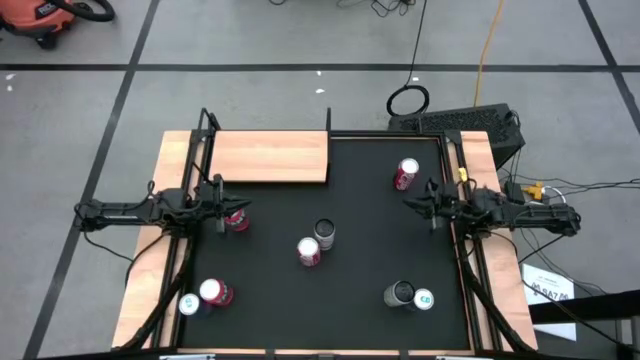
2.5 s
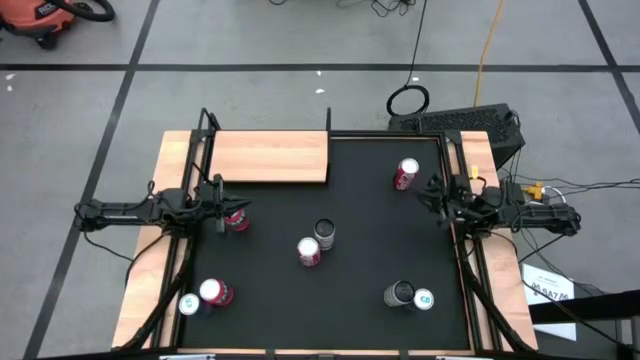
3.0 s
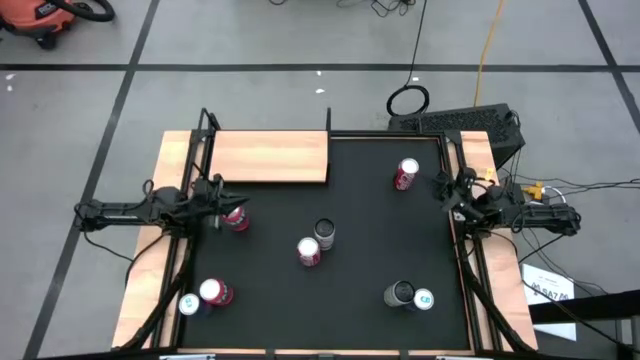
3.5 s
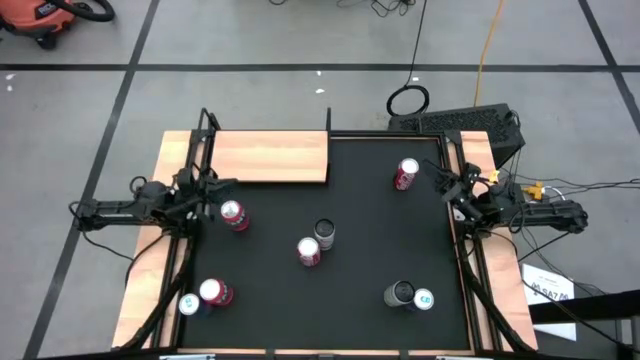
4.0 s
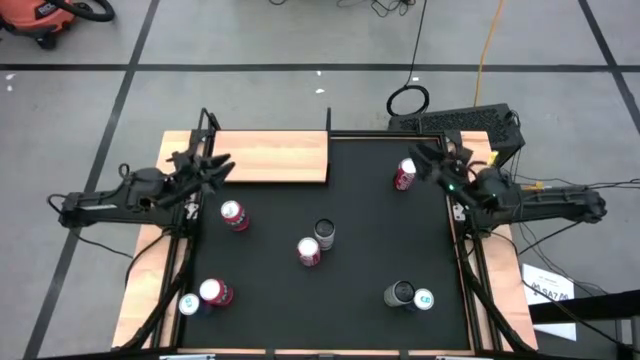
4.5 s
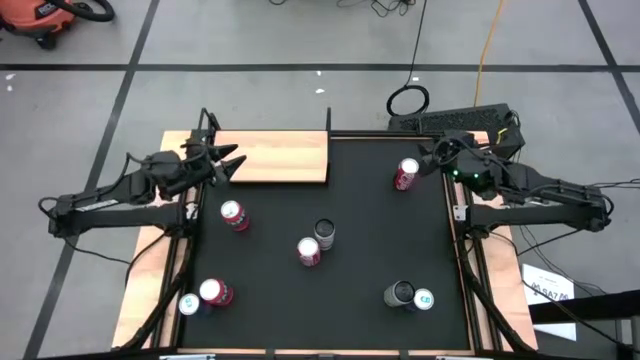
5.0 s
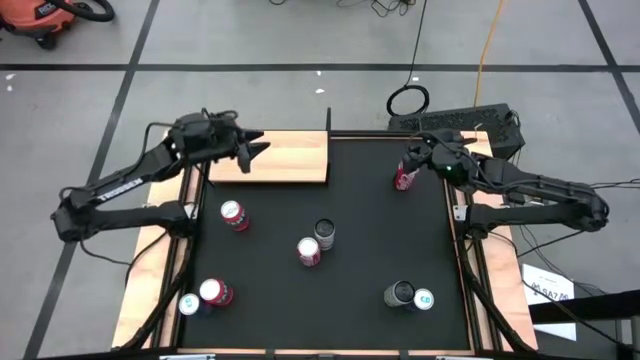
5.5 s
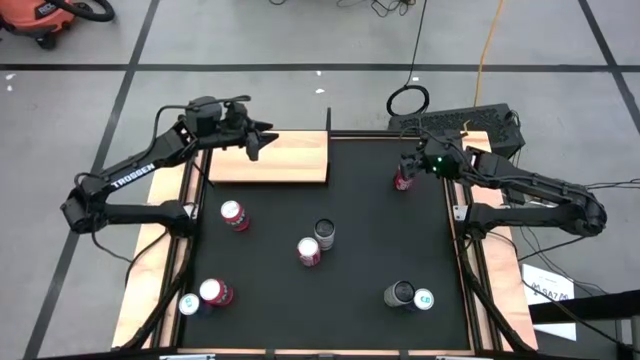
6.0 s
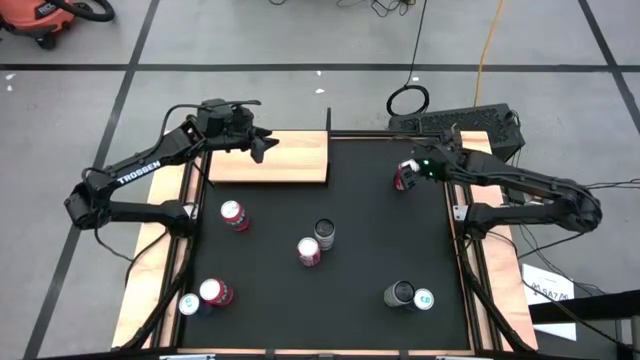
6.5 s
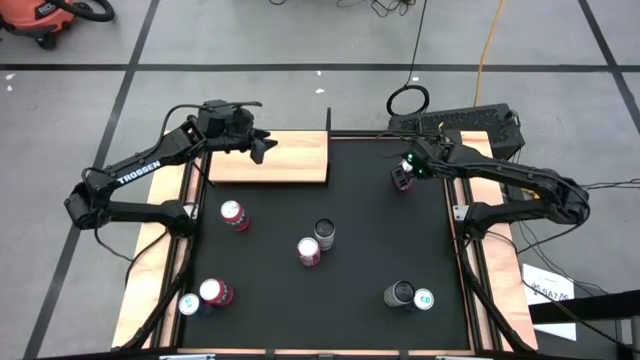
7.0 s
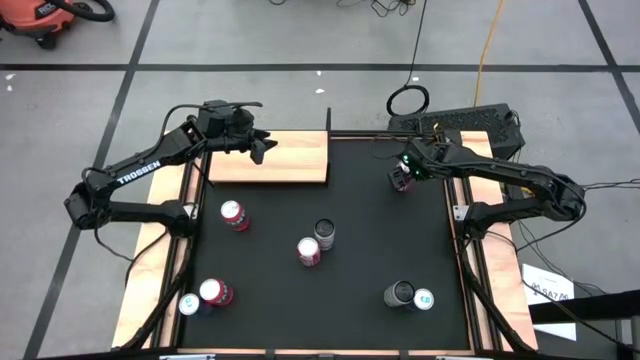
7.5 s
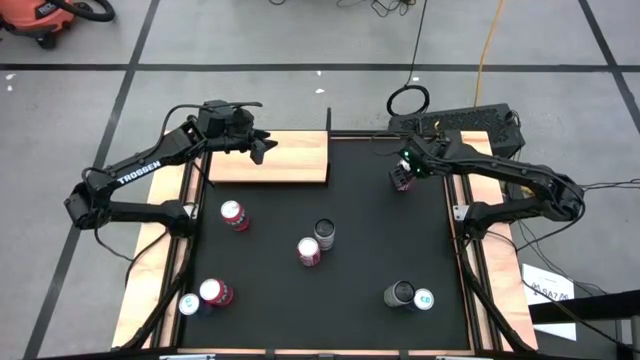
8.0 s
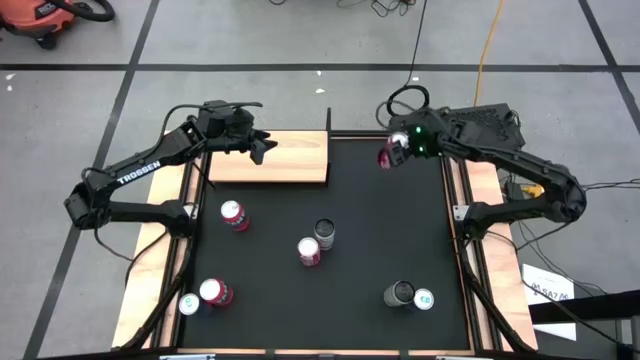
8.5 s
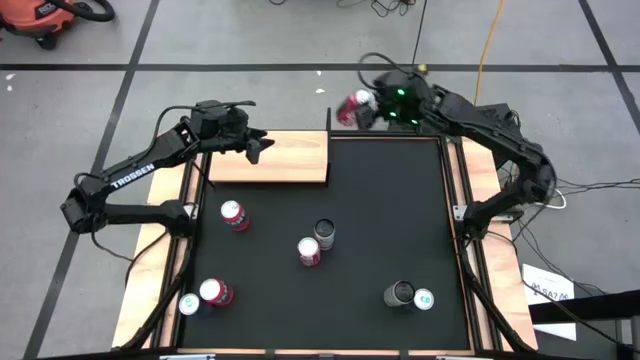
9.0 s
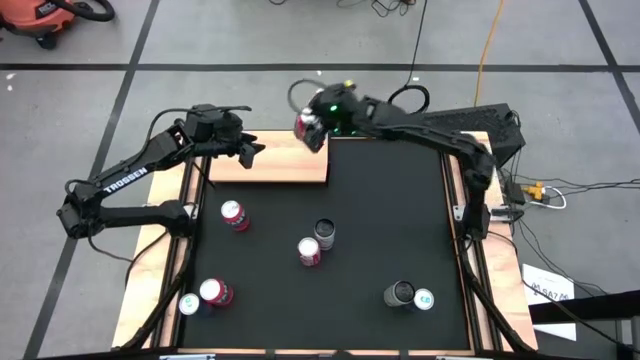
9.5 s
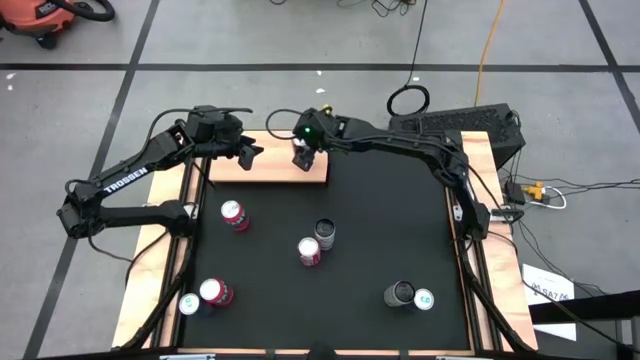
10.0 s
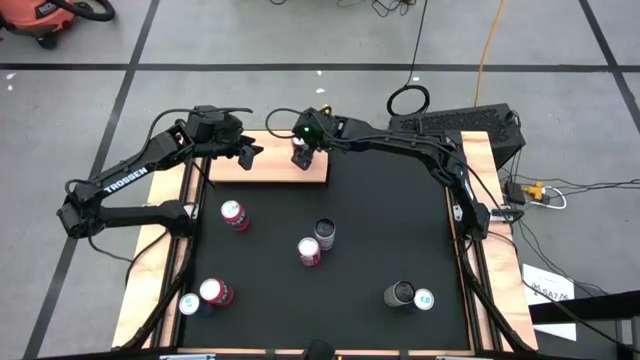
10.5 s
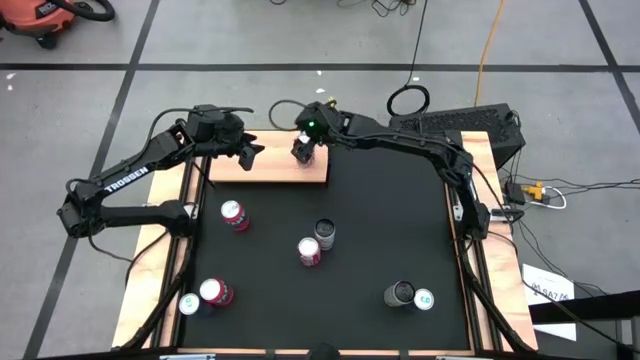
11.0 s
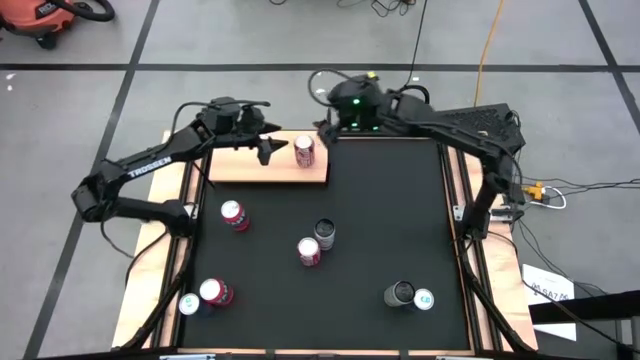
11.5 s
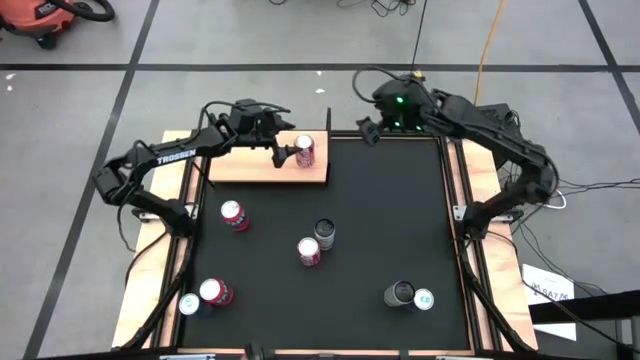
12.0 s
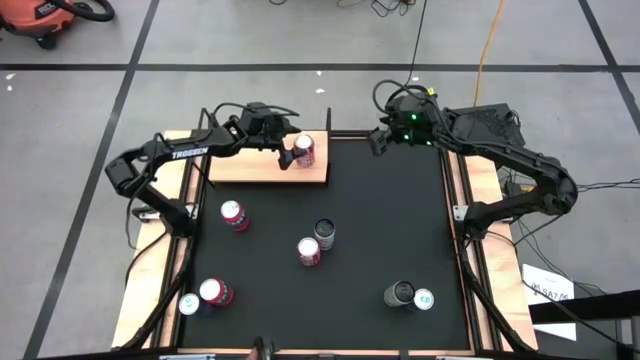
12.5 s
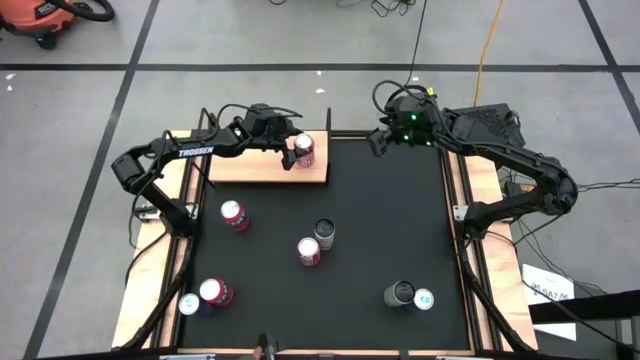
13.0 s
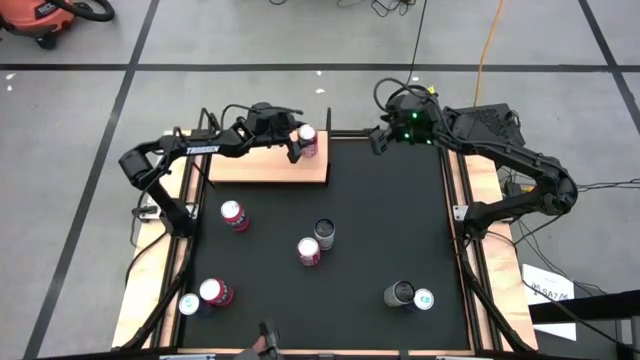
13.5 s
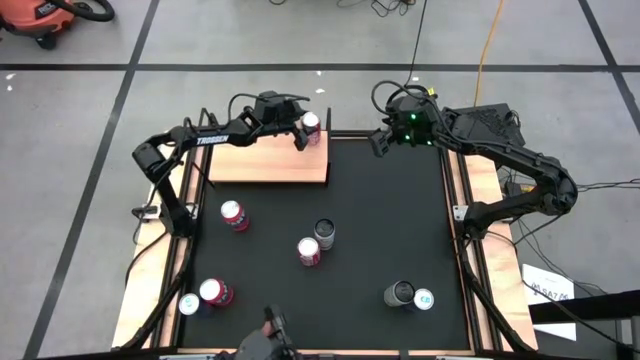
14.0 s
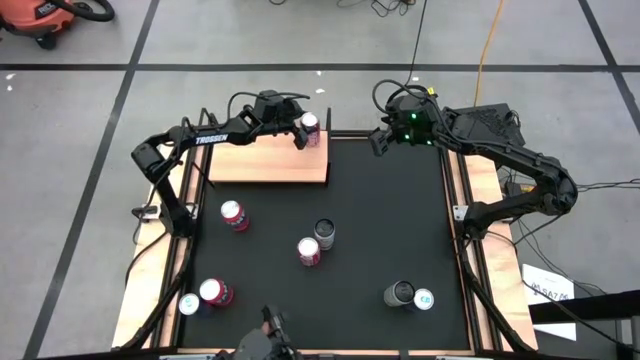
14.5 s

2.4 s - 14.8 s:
Task: Place canned beverage on shelf
Put the top red white soda can on the shelf

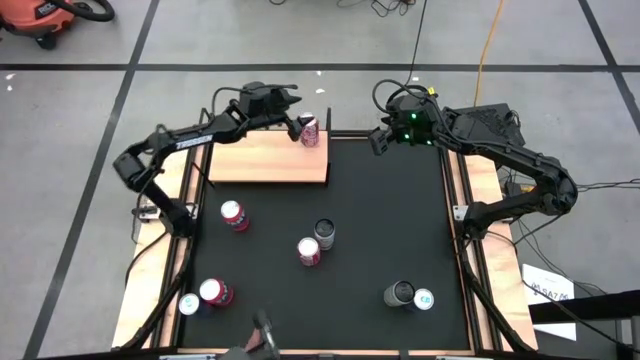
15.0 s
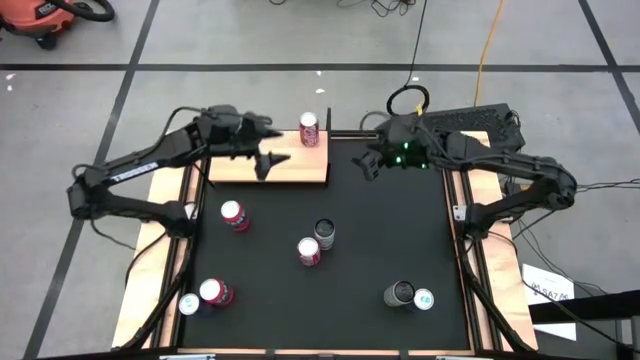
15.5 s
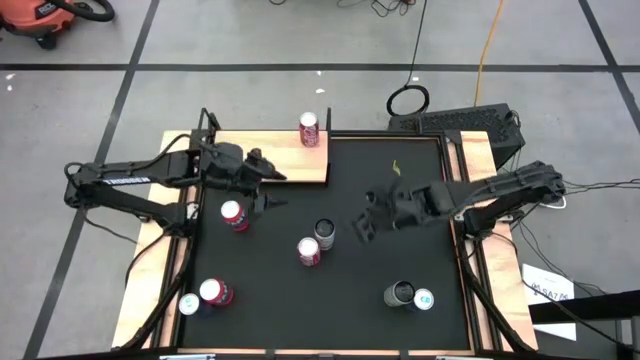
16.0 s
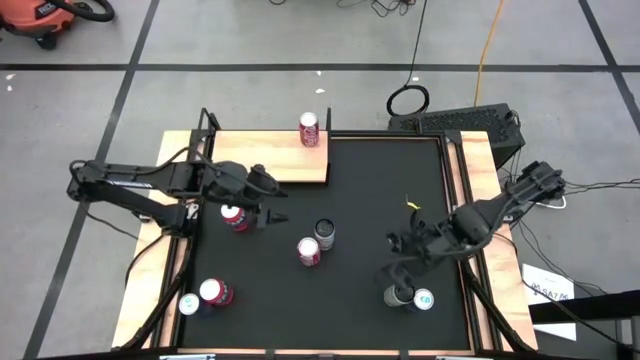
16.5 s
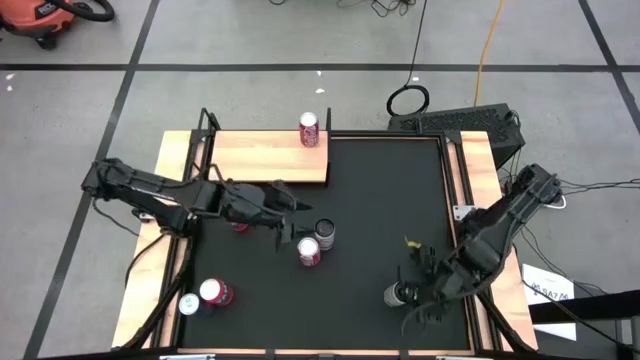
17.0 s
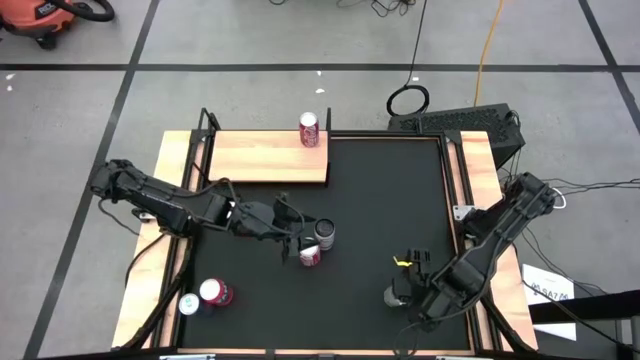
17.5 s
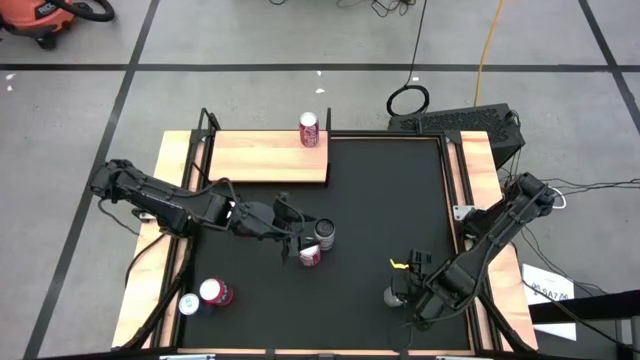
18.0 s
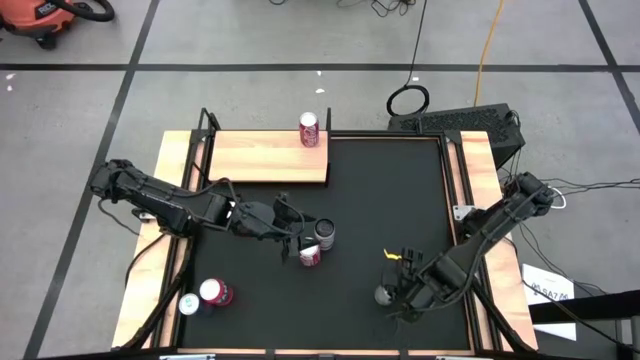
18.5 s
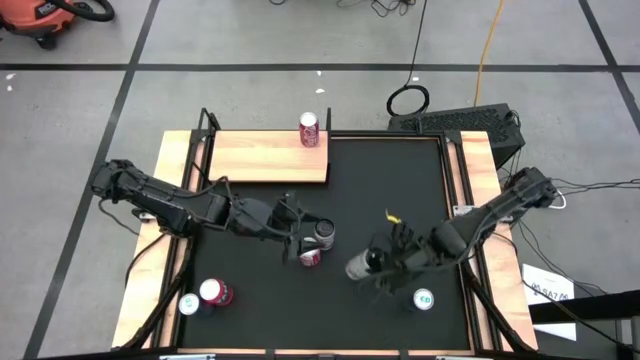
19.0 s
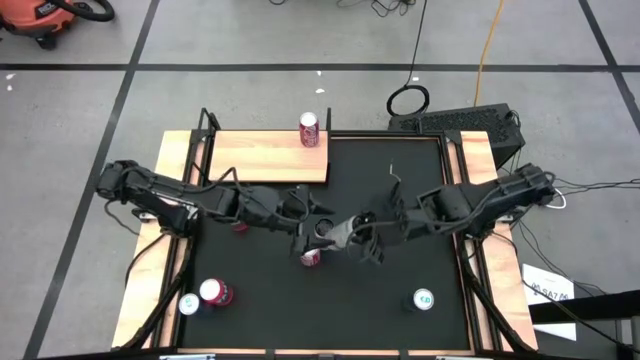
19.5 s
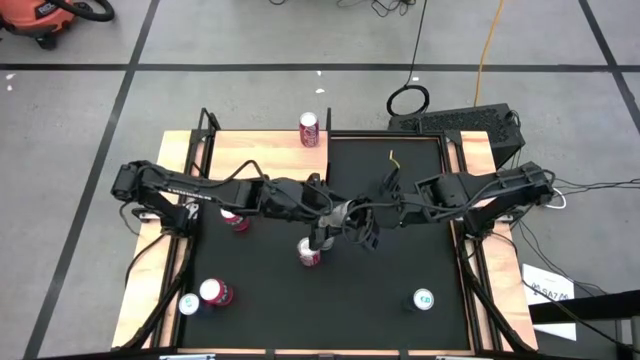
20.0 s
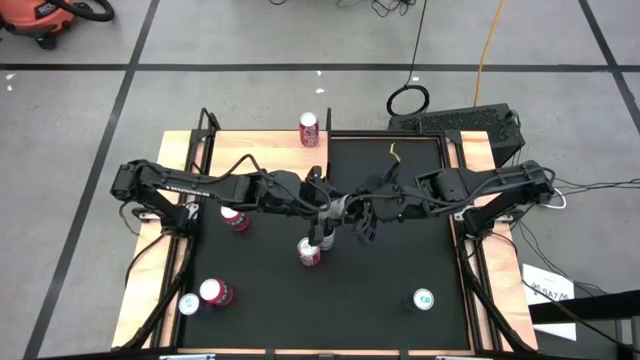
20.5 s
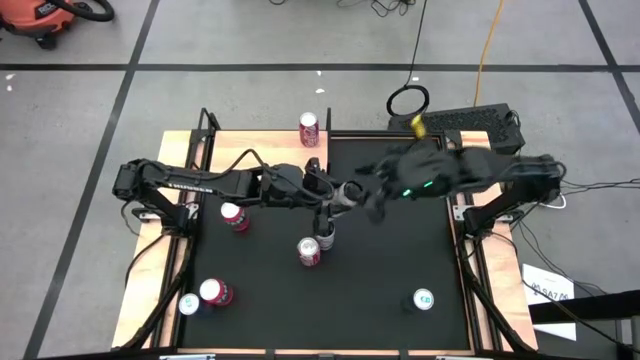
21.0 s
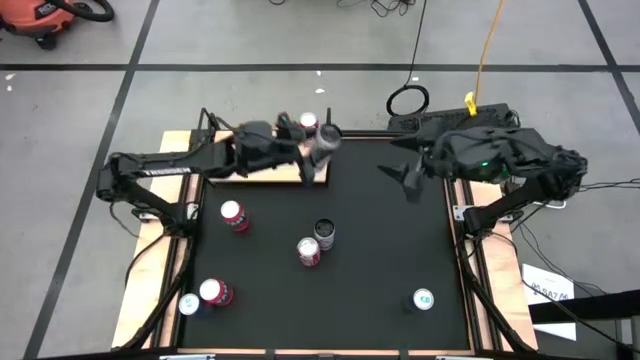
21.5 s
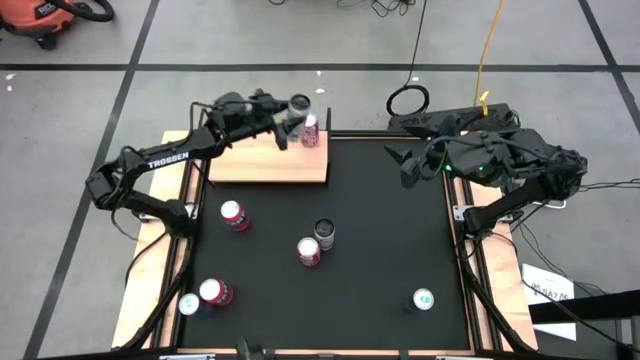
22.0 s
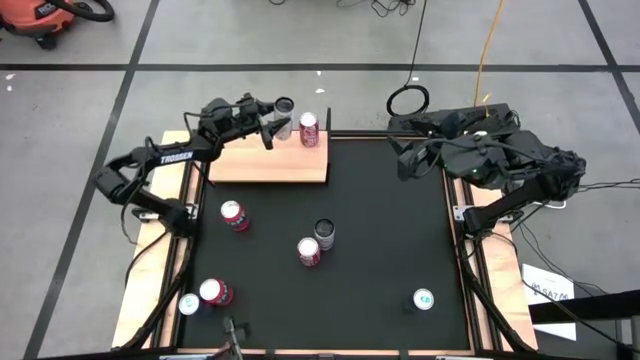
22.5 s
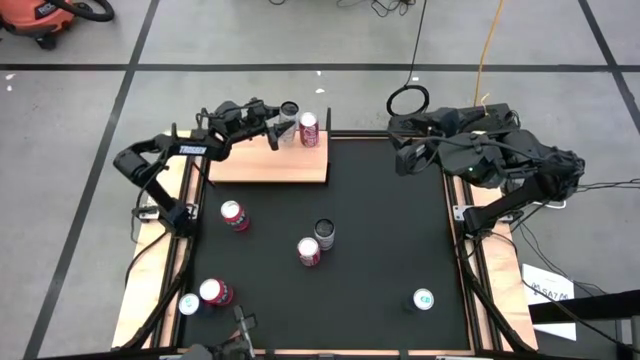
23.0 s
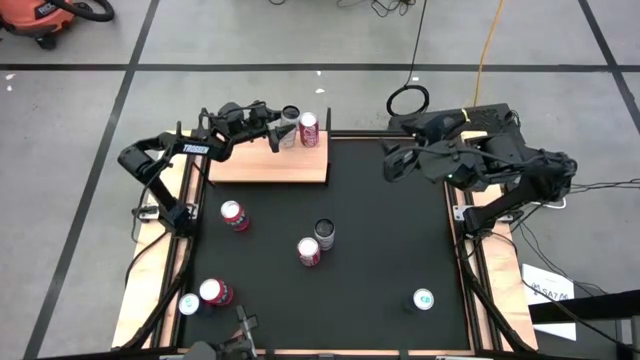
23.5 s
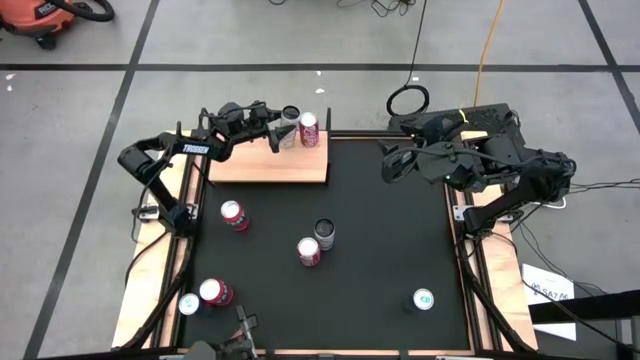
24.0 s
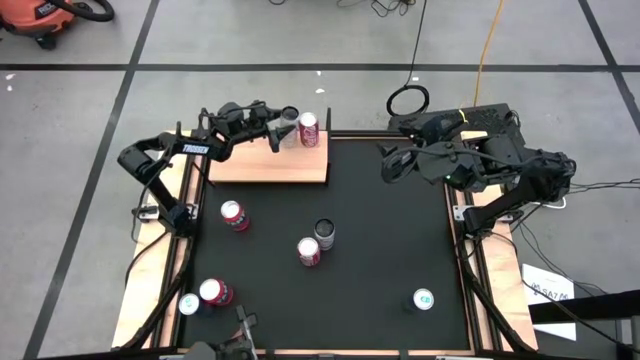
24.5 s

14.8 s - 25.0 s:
Put the bottom white yellow soda can on the shelf
